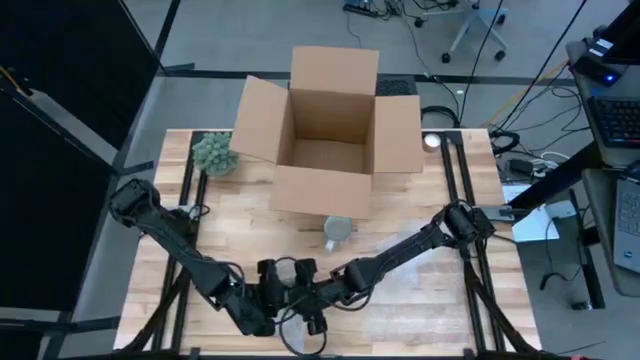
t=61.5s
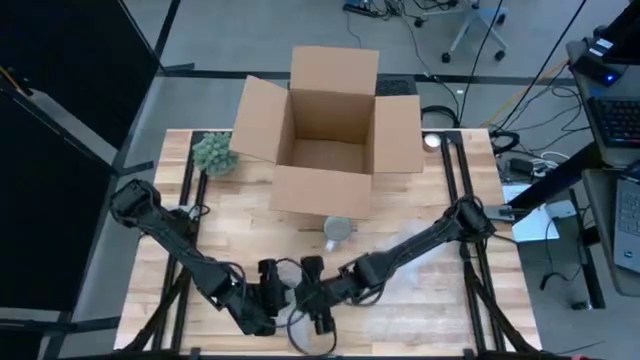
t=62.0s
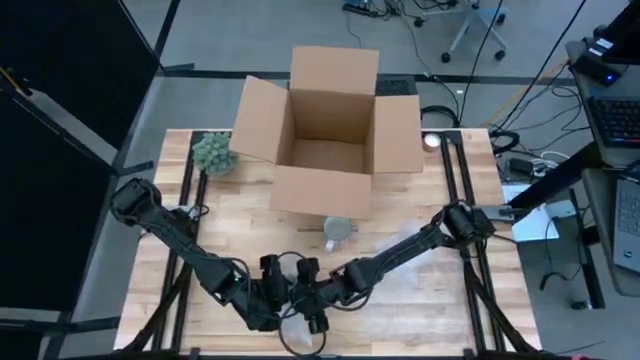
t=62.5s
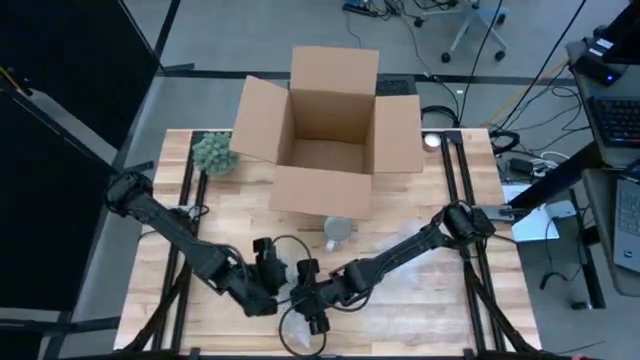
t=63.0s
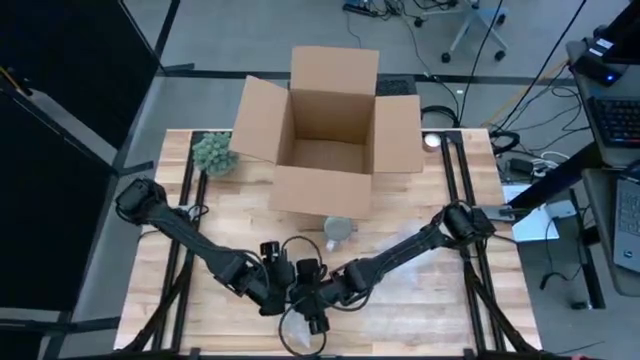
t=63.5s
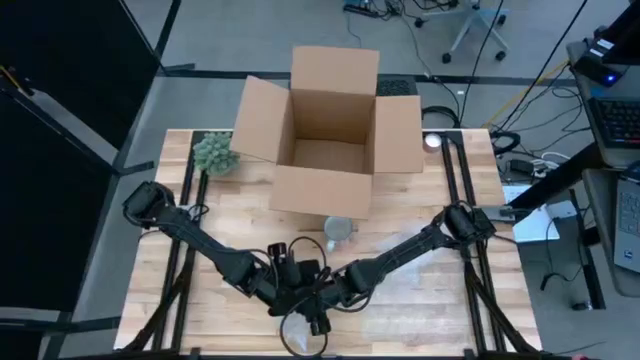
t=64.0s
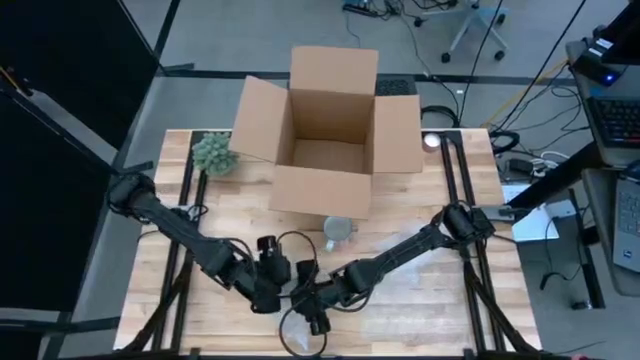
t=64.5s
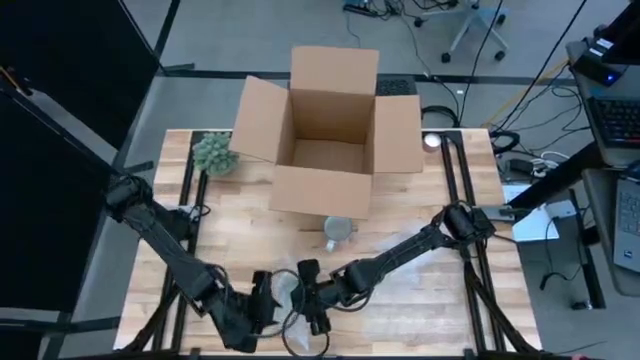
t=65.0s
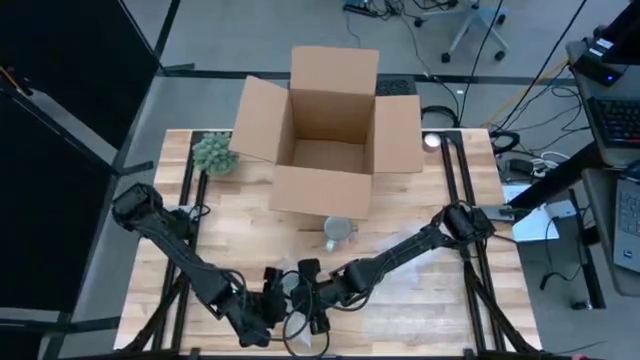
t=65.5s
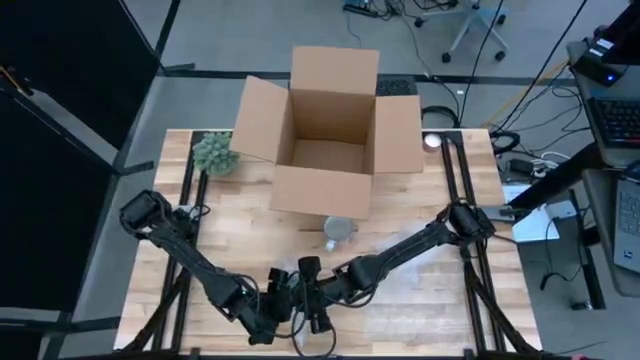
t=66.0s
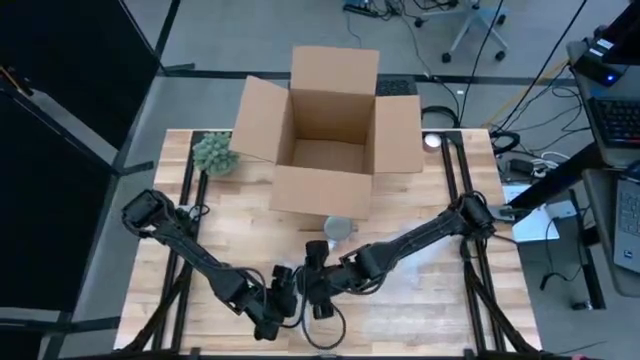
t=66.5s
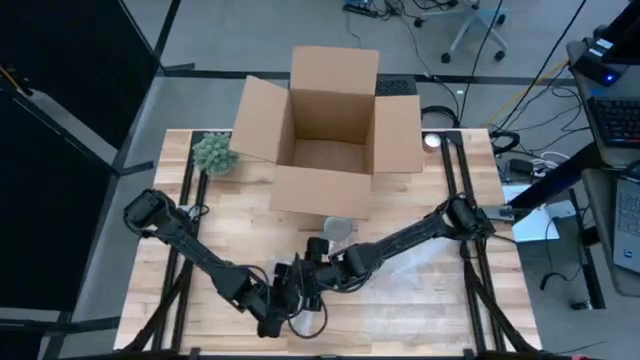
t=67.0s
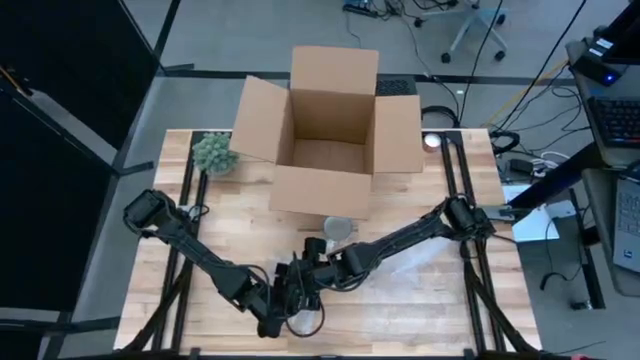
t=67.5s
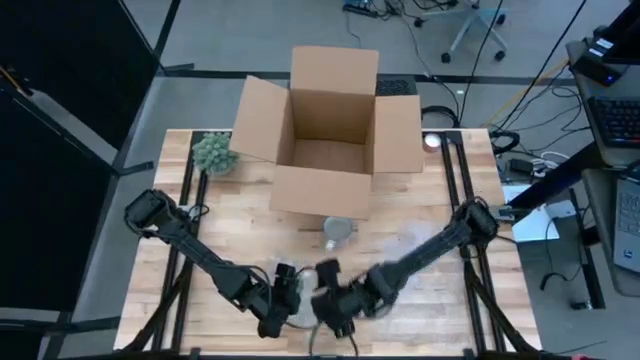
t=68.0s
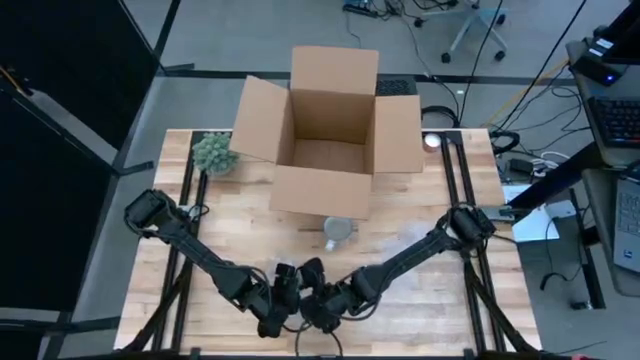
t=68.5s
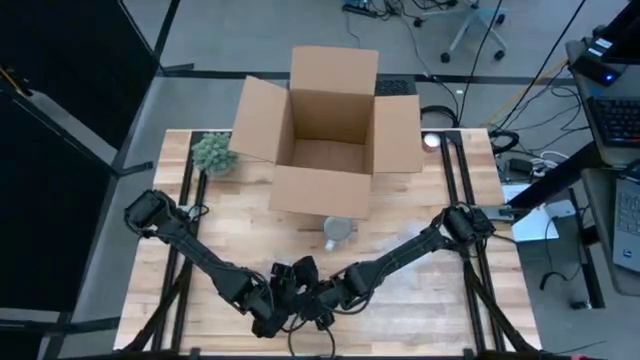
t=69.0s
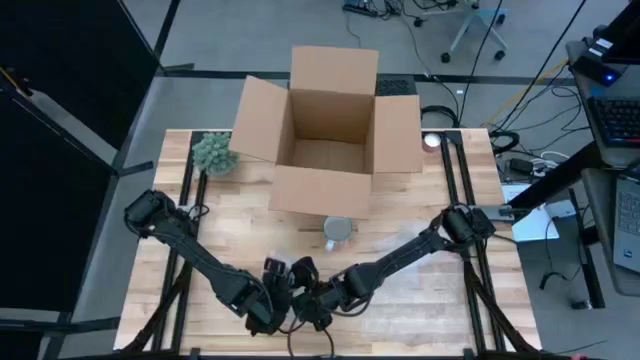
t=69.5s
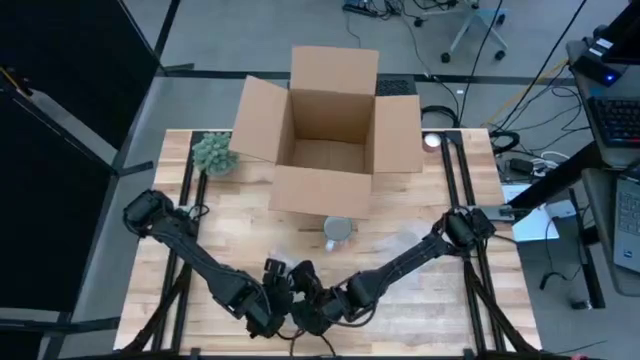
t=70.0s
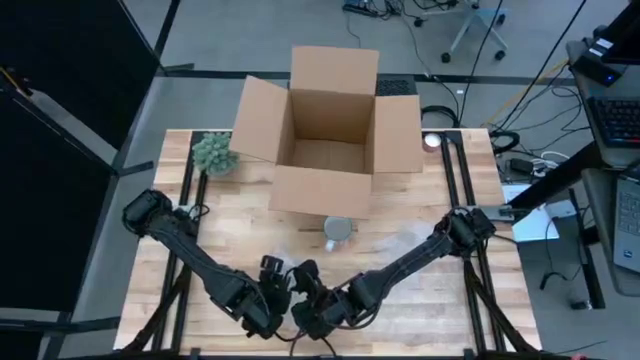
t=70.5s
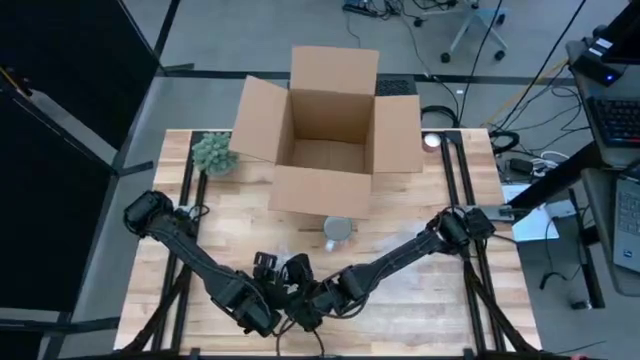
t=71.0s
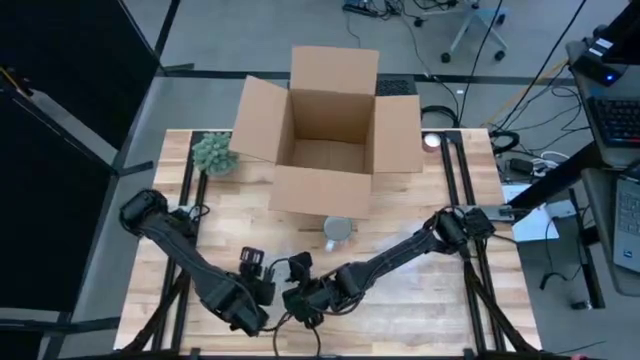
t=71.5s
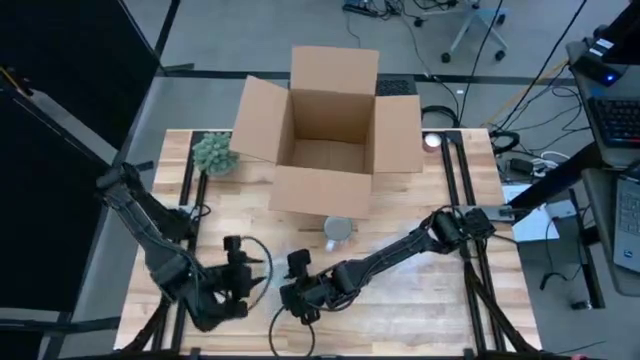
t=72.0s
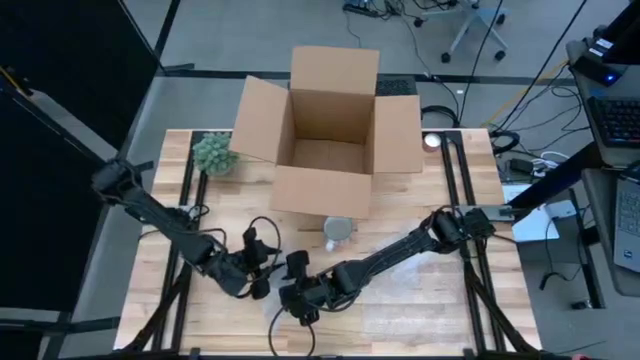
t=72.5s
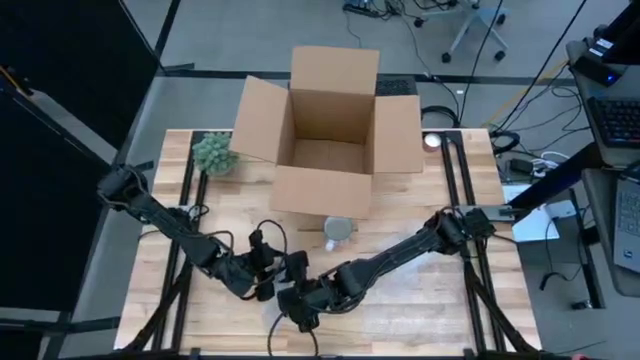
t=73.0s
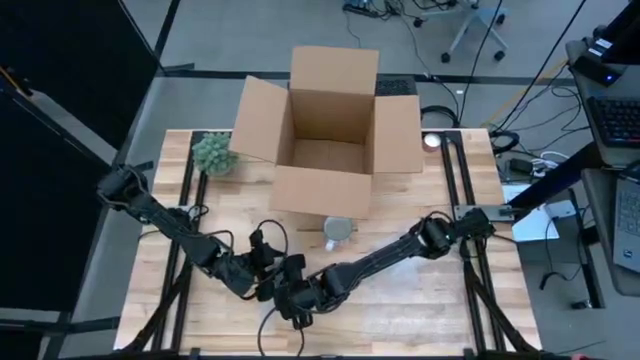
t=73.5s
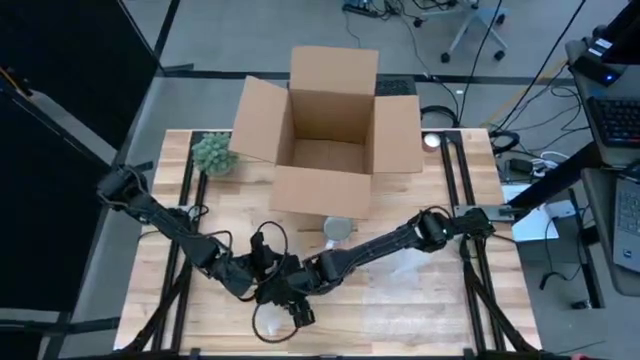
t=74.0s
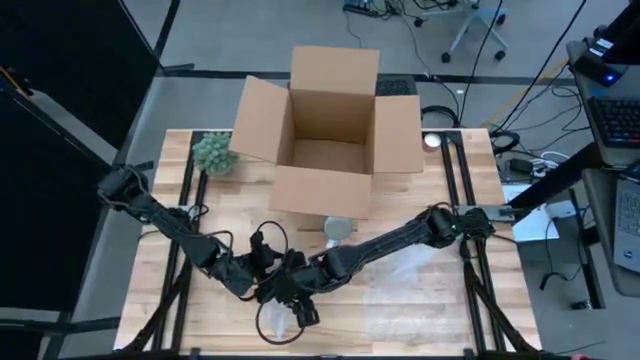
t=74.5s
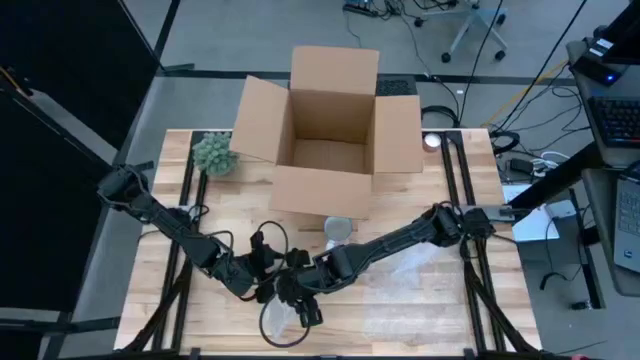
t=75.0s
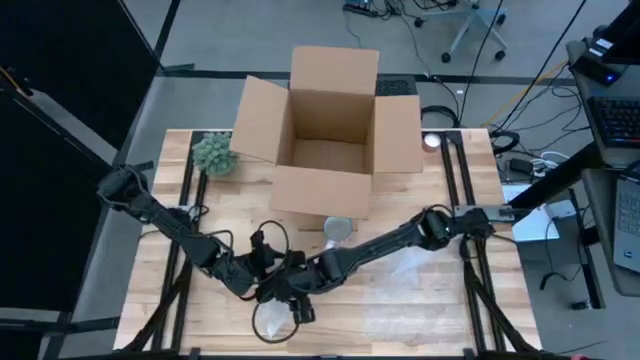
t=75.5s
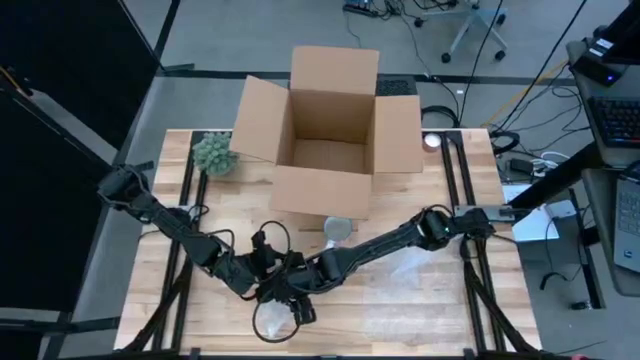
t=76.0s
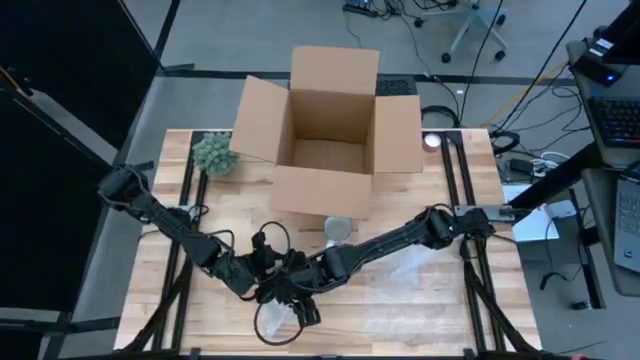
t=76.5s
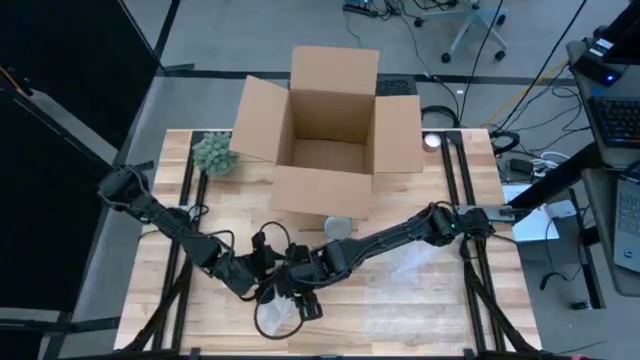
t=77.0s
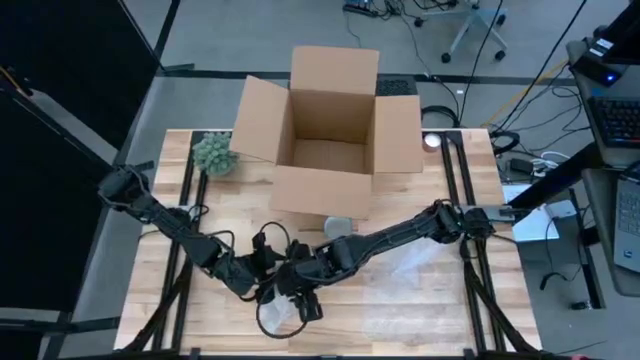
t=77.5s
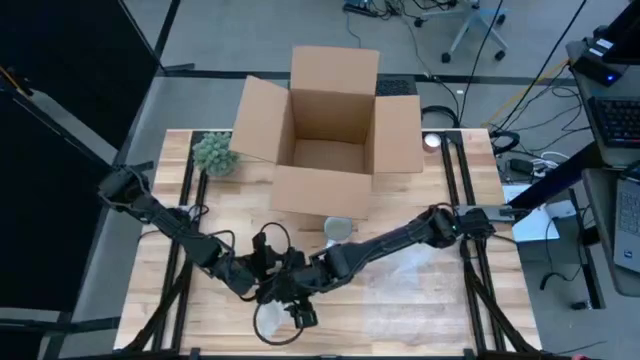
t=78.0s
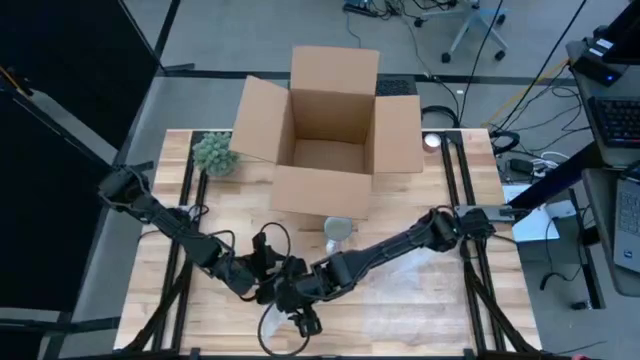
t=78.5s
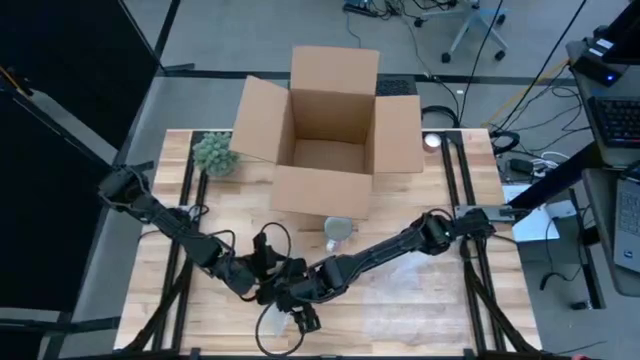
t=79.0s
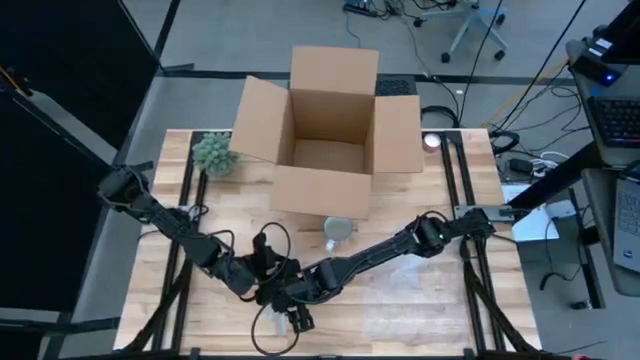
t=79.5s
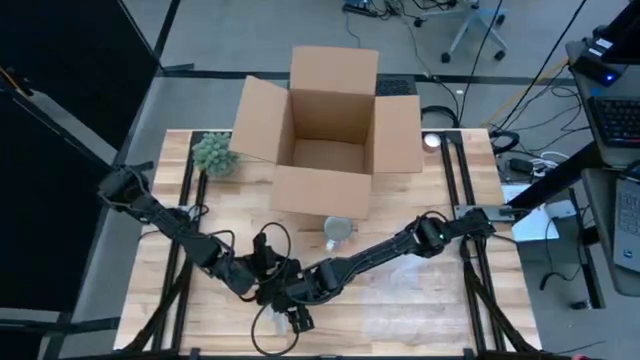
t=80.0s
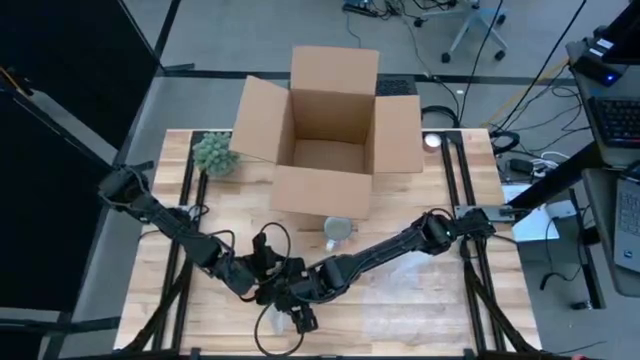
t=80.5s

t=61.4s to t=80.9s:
Task: wrap mug
Wrap the orange mug with bubble wrap
